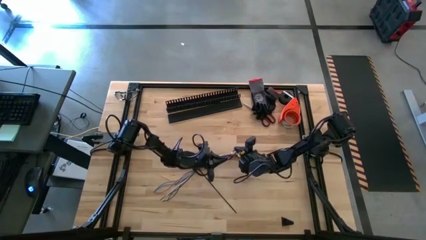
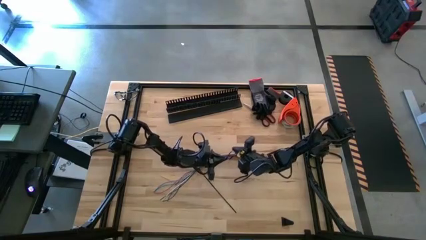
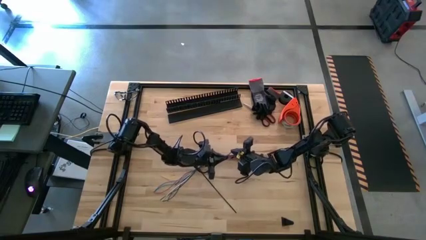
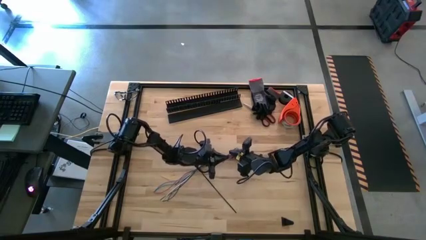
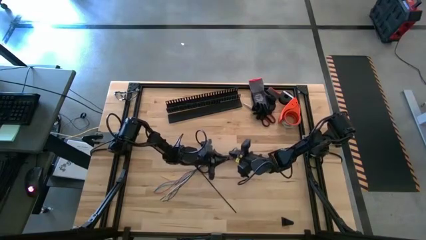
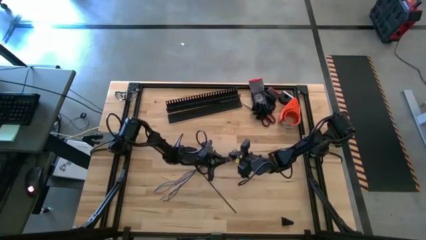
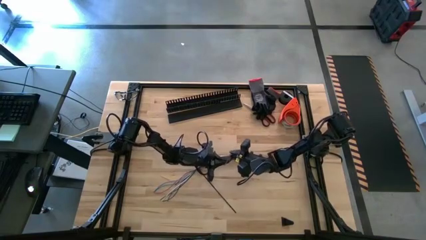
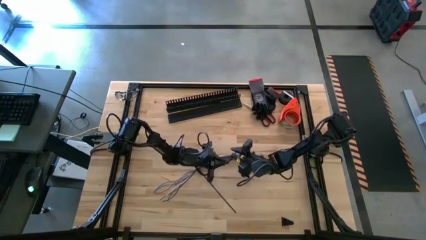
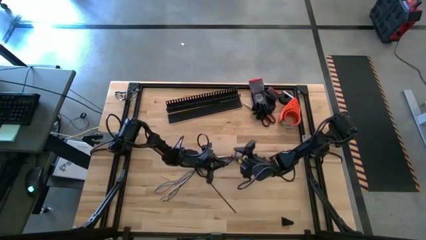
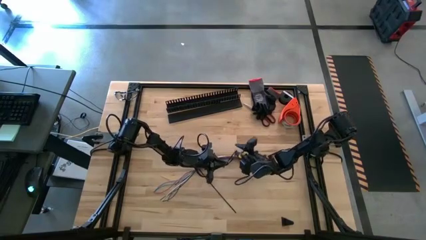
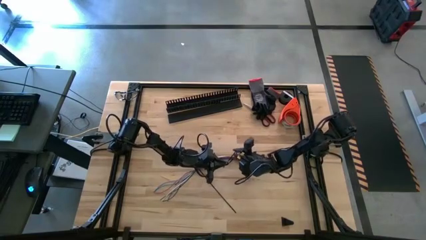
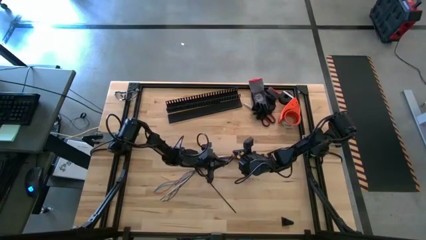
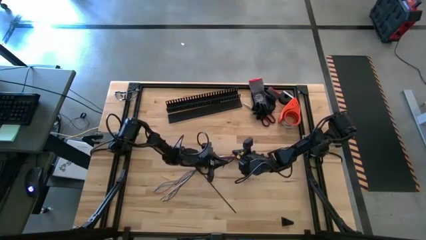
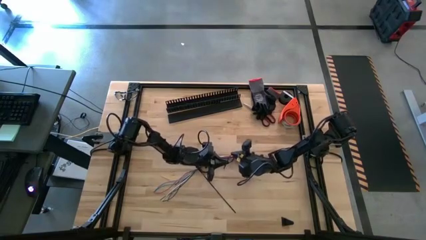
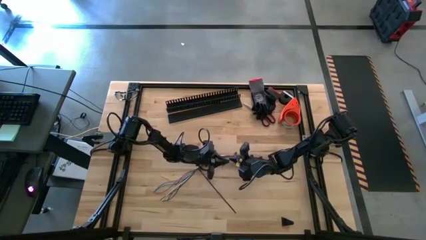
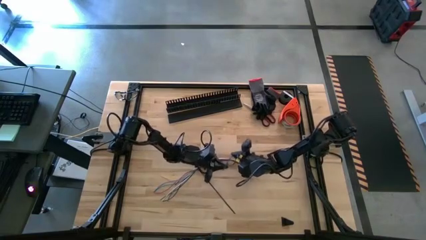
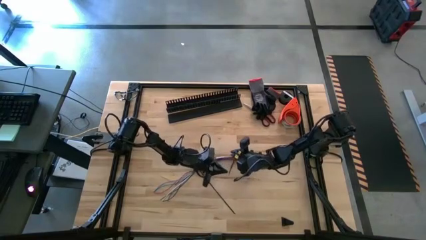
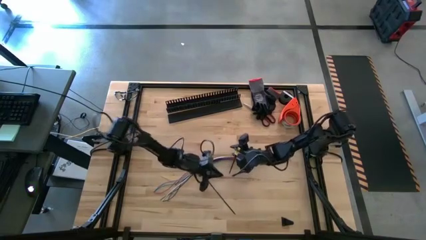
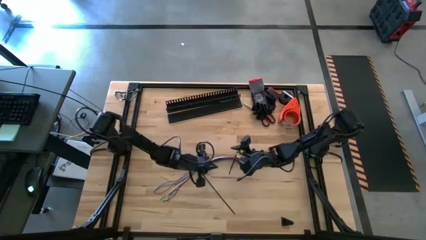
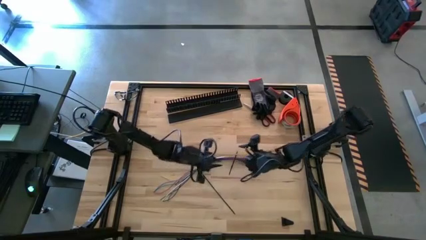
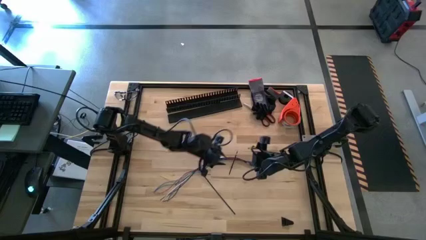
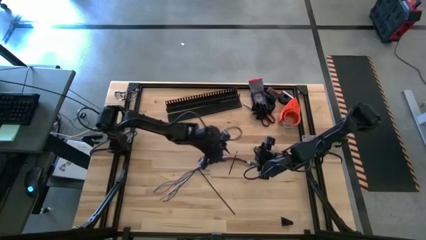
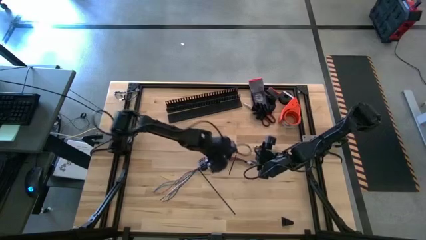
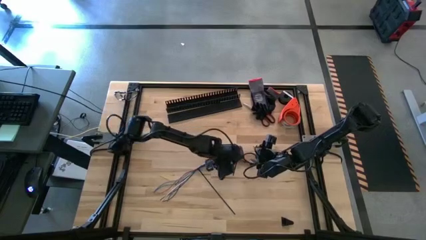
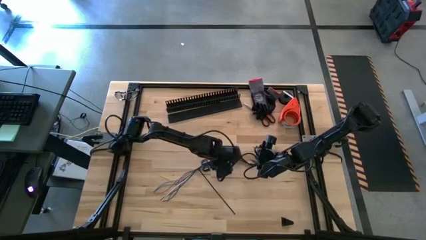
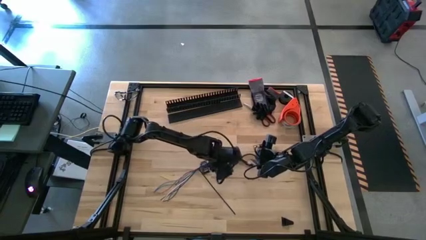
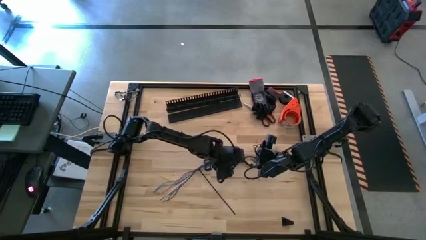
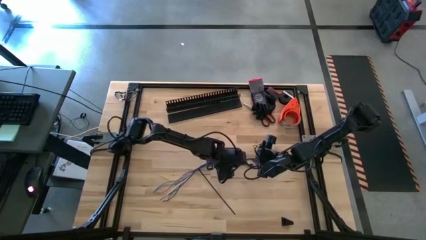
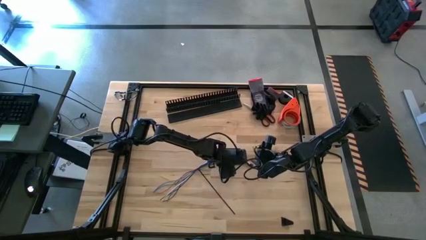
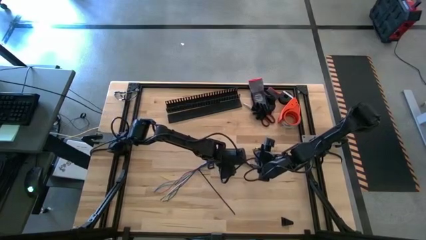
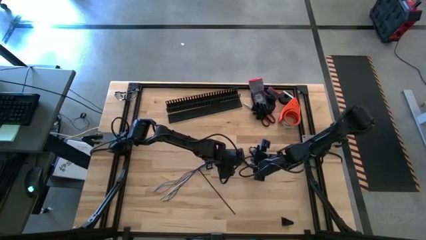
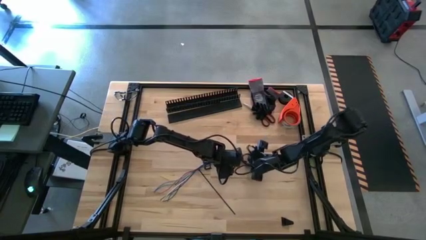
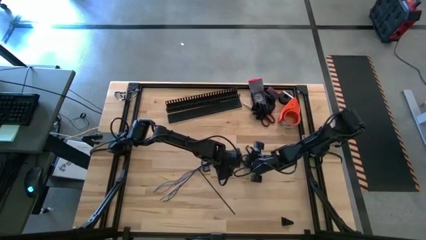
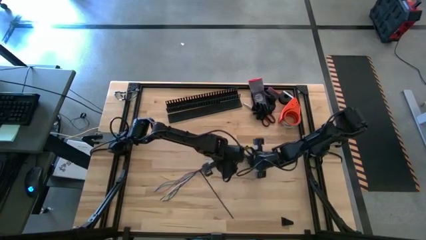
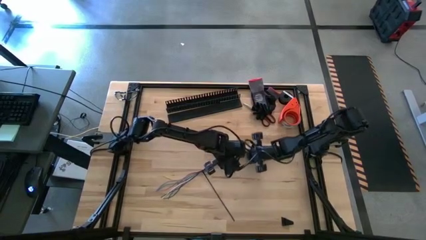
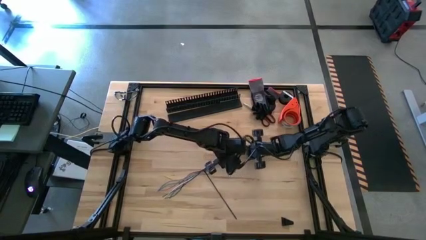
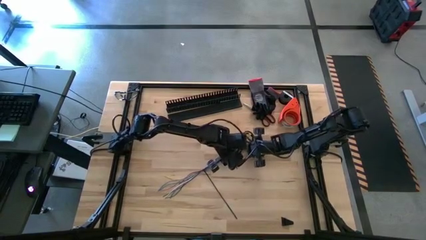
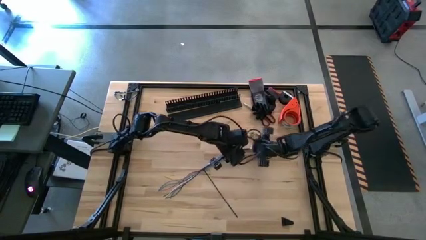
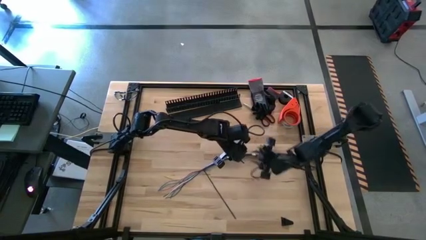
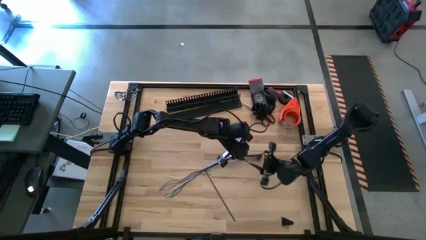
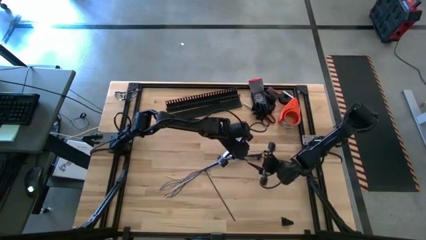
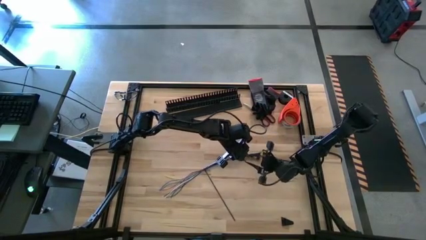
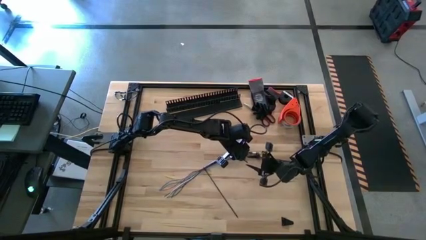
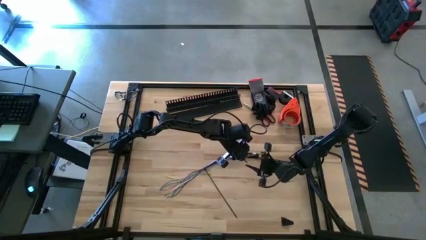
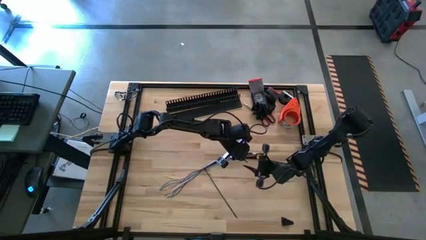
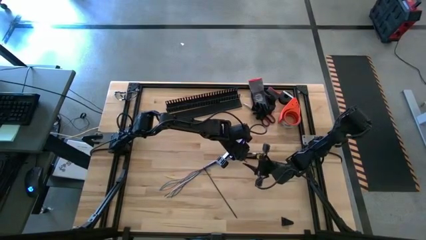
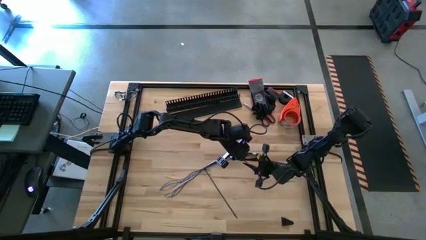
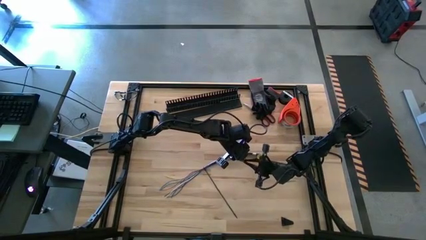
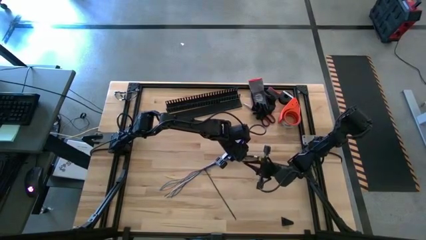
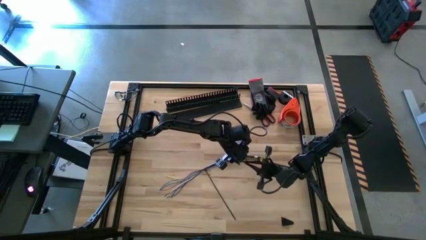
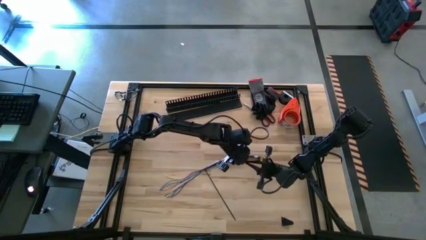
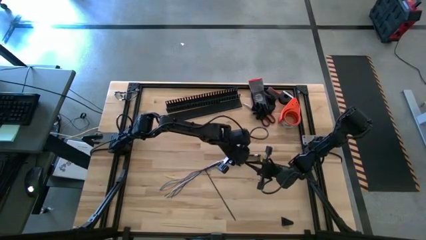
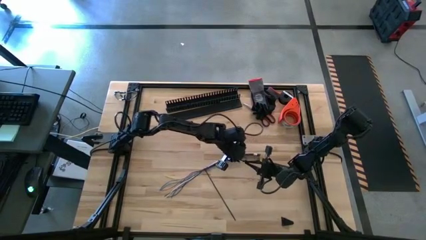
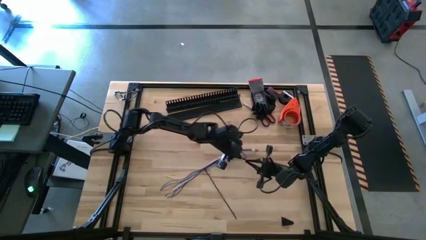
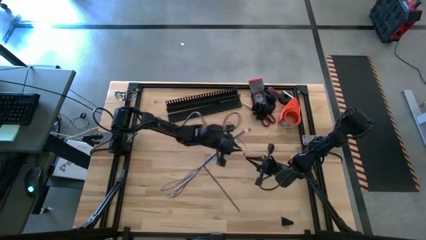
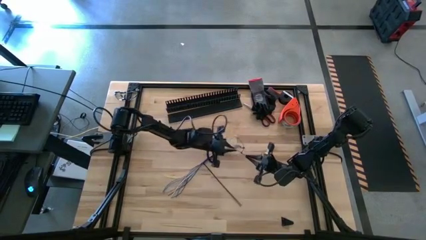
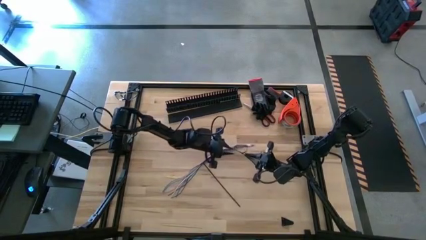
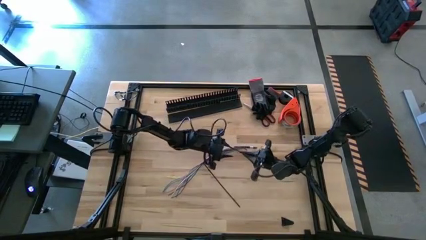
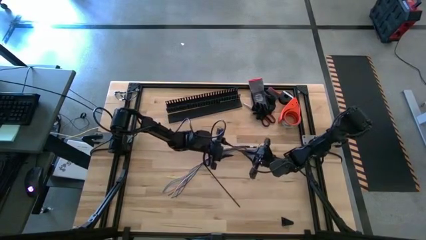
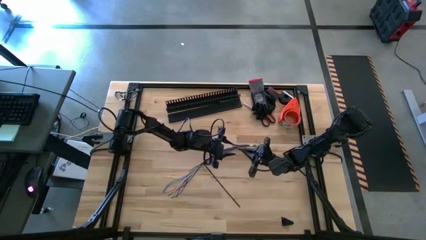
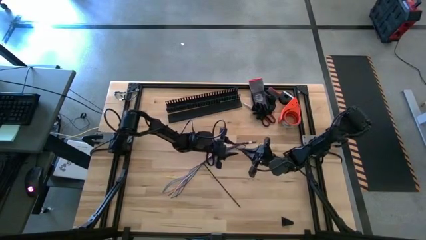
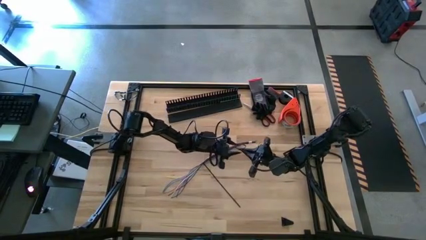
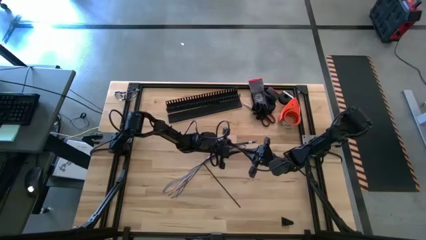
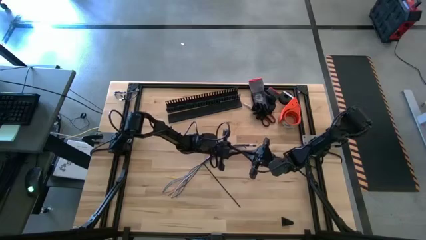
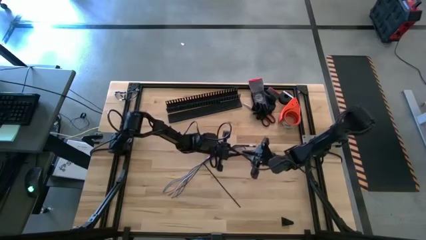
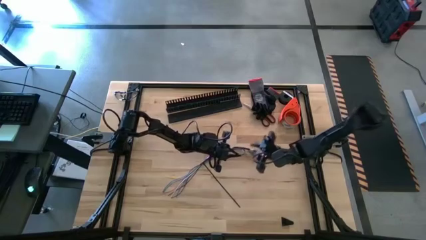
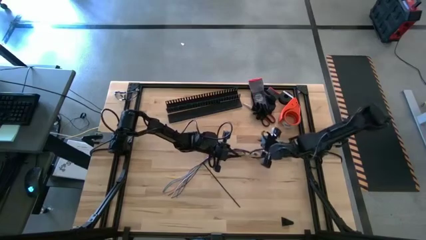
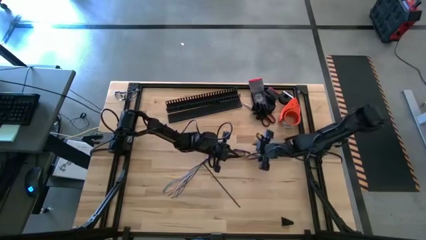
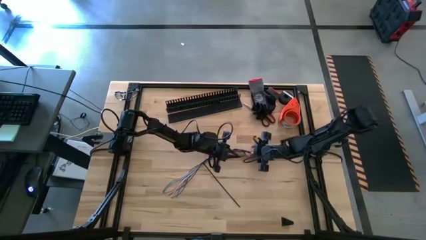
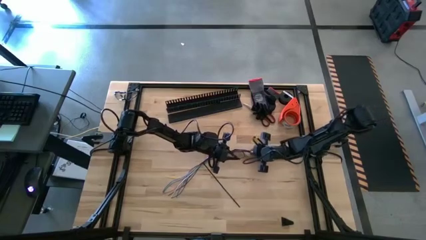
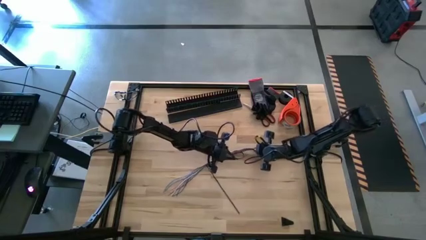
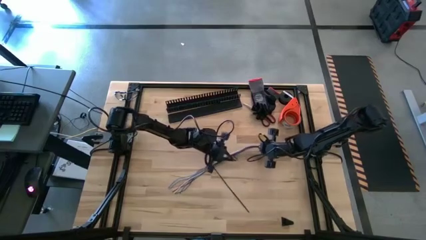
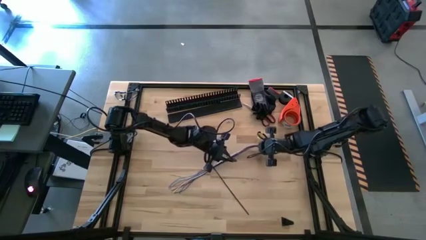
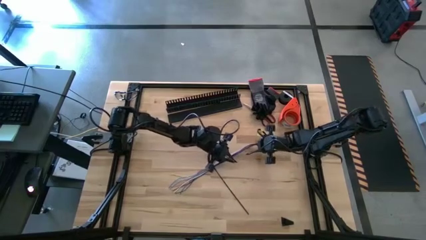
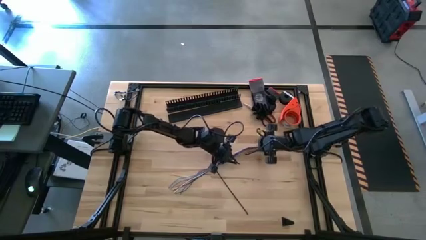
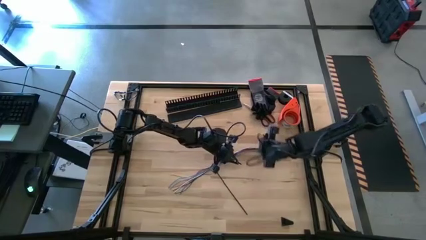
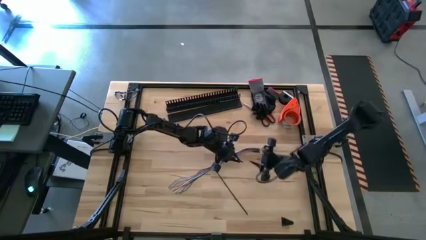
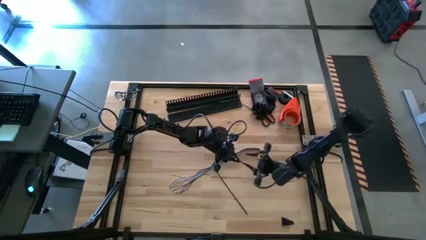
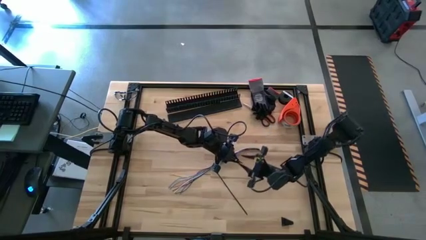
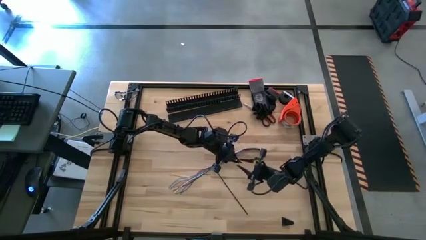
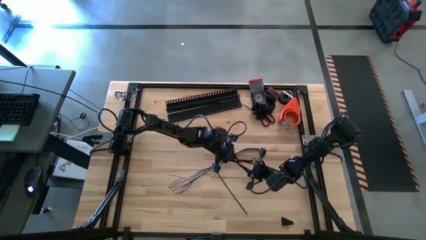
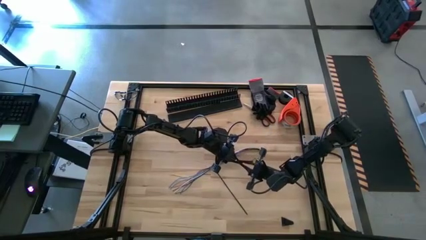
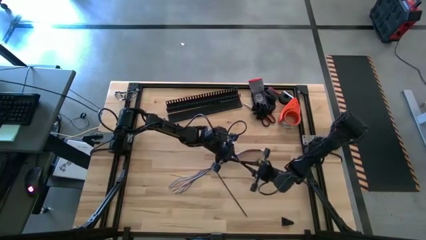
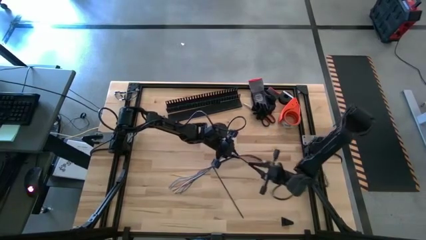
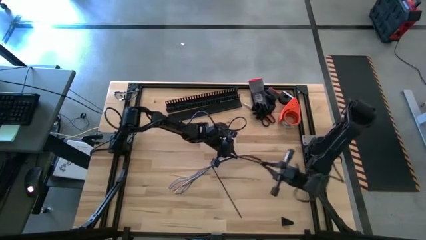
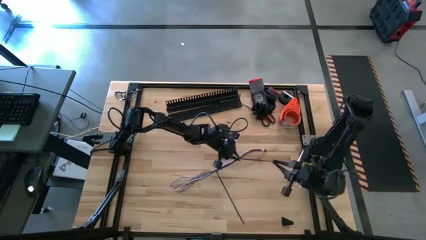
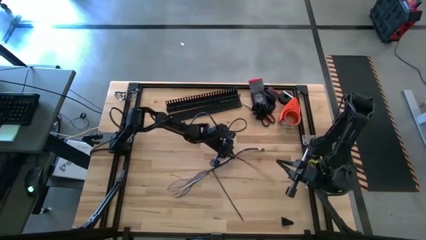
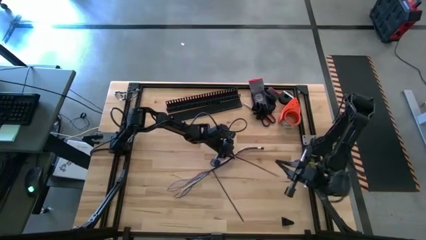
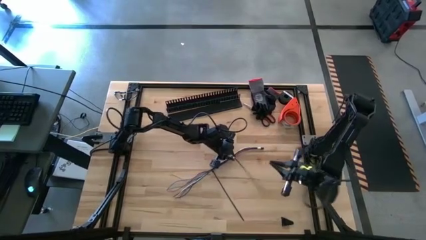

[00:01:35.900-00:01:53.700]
Task: Ziptie cables
Wrap the black zip tie around the colored cable bundle
